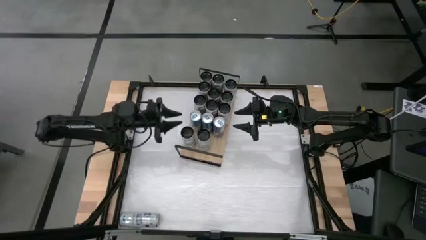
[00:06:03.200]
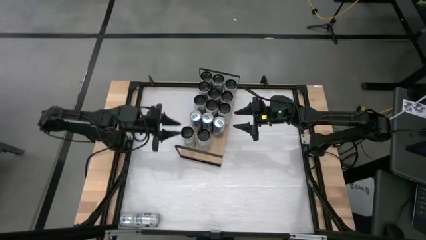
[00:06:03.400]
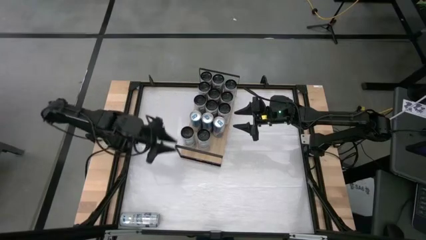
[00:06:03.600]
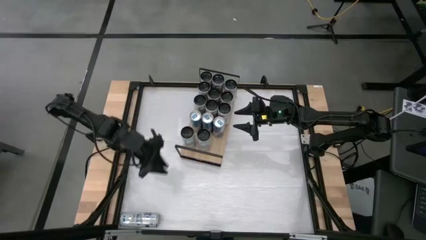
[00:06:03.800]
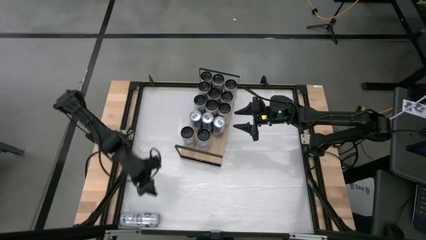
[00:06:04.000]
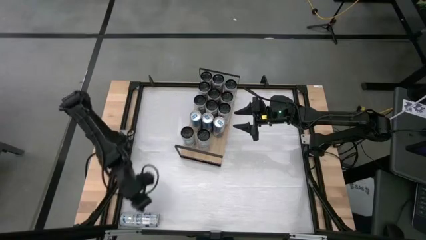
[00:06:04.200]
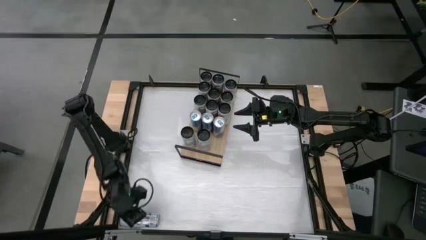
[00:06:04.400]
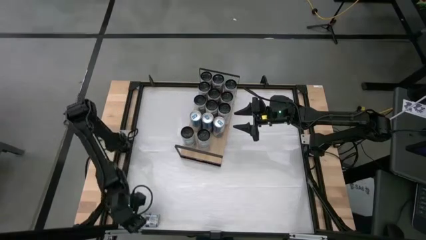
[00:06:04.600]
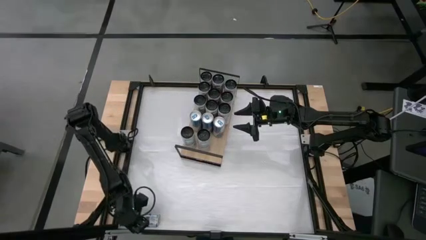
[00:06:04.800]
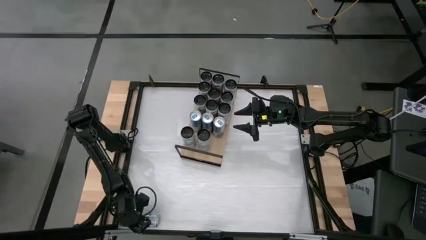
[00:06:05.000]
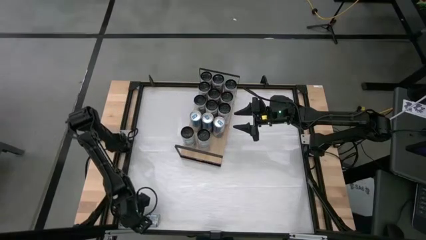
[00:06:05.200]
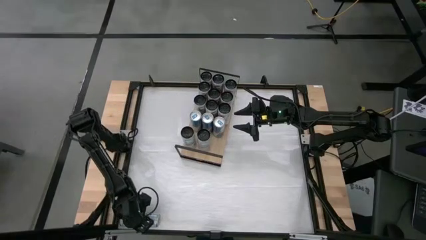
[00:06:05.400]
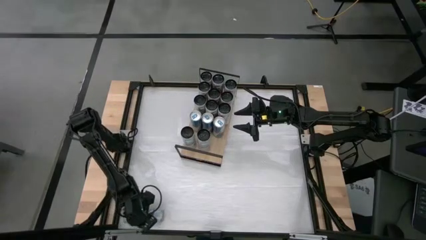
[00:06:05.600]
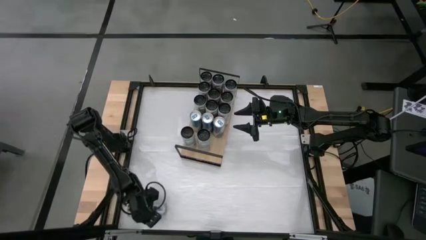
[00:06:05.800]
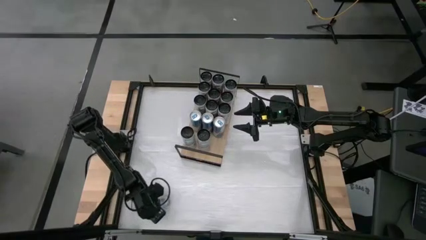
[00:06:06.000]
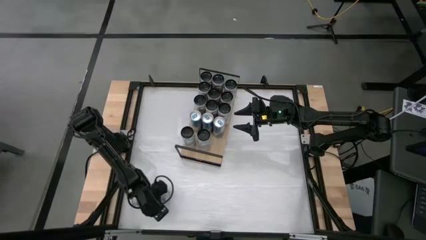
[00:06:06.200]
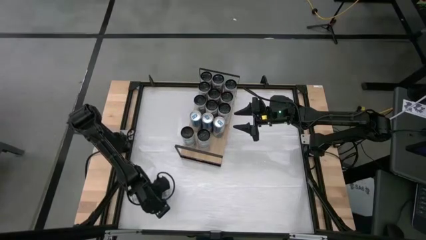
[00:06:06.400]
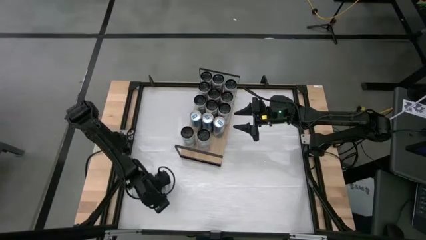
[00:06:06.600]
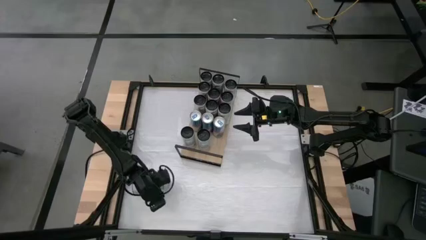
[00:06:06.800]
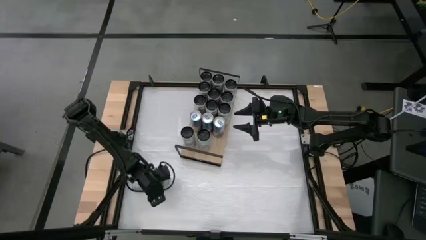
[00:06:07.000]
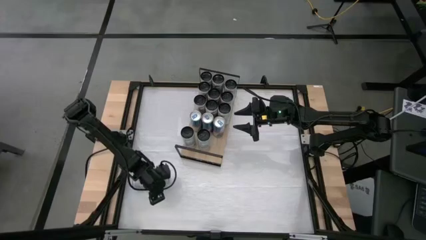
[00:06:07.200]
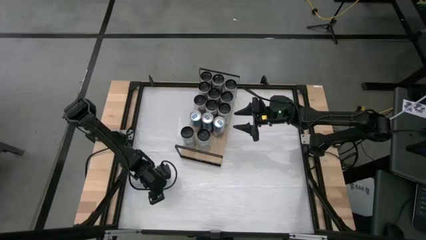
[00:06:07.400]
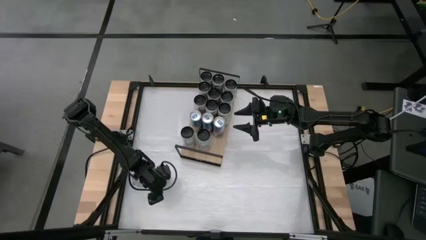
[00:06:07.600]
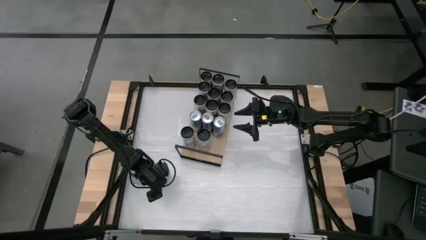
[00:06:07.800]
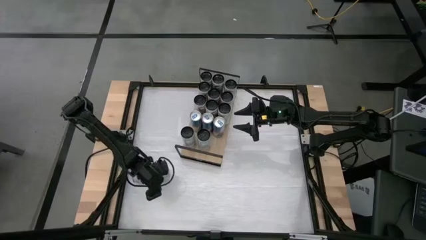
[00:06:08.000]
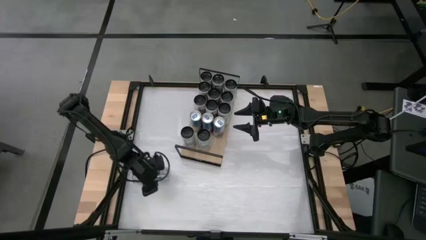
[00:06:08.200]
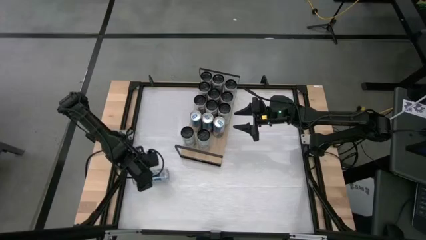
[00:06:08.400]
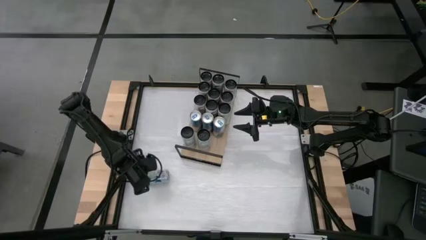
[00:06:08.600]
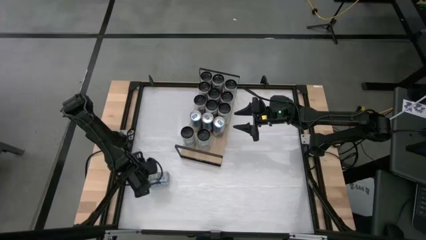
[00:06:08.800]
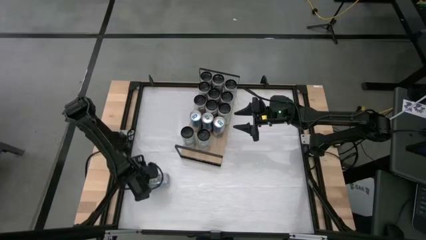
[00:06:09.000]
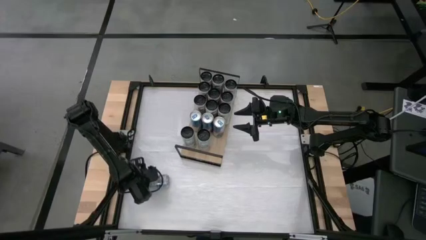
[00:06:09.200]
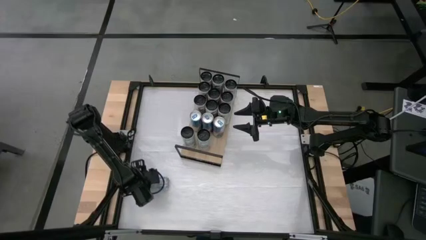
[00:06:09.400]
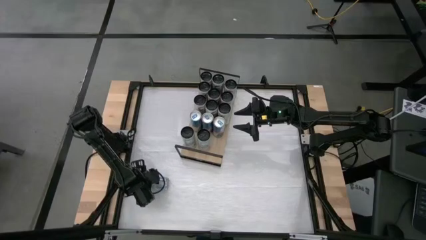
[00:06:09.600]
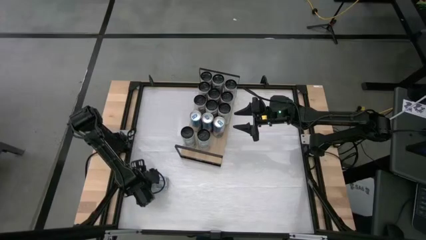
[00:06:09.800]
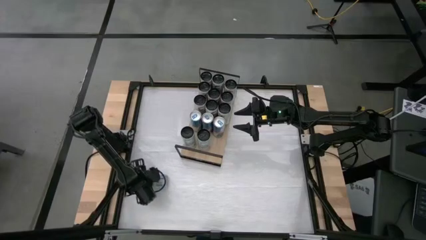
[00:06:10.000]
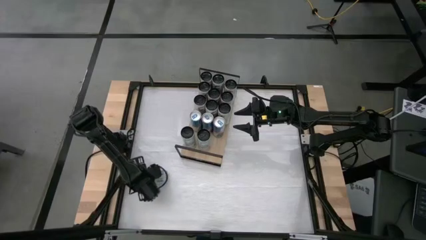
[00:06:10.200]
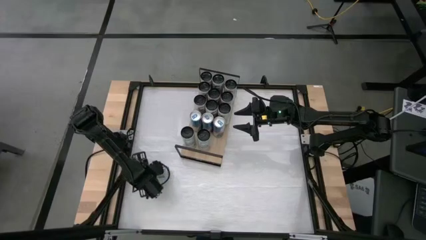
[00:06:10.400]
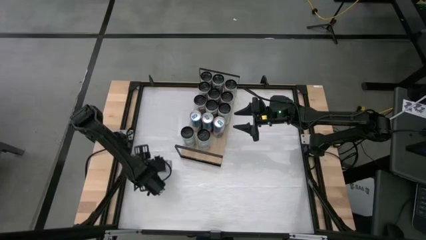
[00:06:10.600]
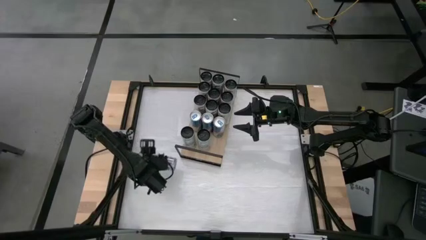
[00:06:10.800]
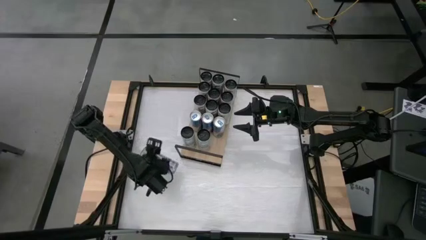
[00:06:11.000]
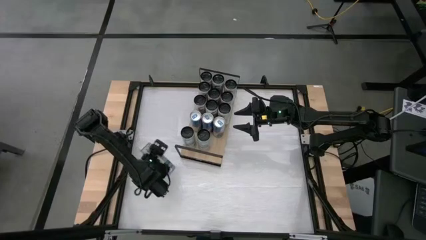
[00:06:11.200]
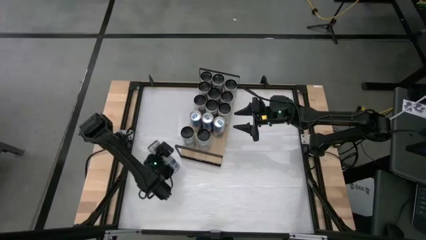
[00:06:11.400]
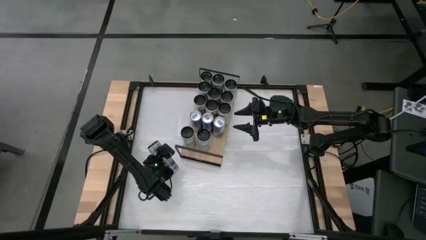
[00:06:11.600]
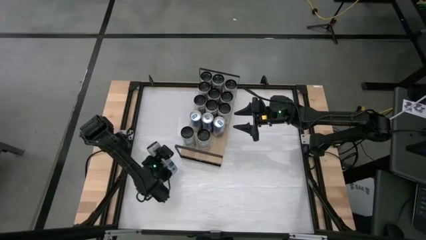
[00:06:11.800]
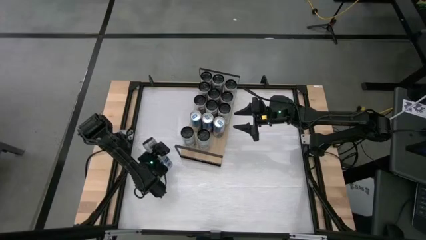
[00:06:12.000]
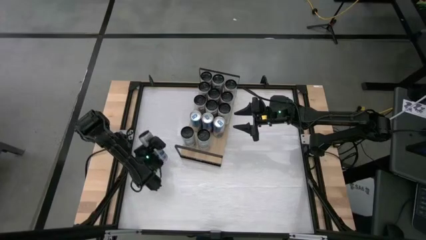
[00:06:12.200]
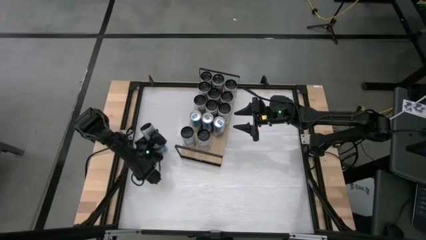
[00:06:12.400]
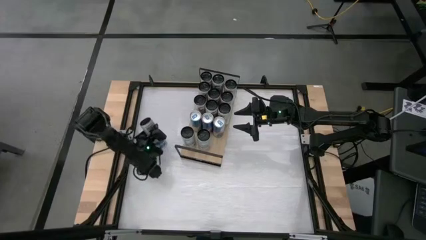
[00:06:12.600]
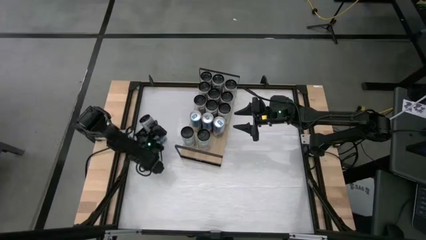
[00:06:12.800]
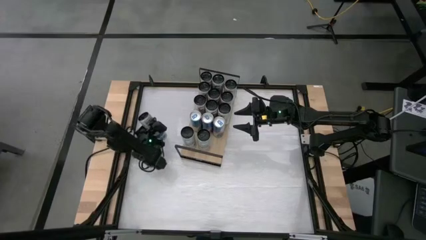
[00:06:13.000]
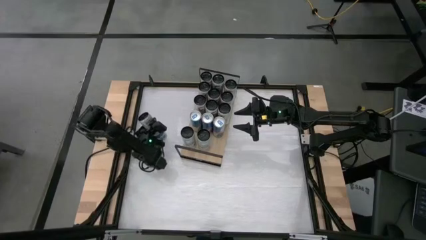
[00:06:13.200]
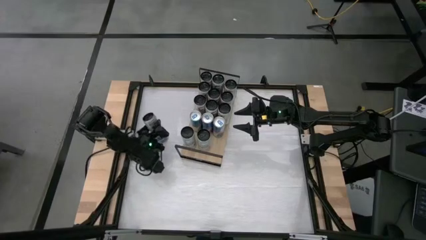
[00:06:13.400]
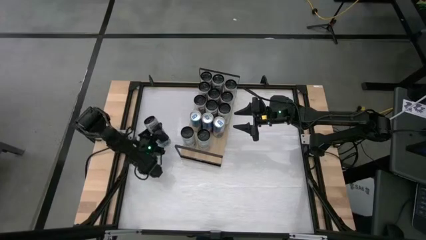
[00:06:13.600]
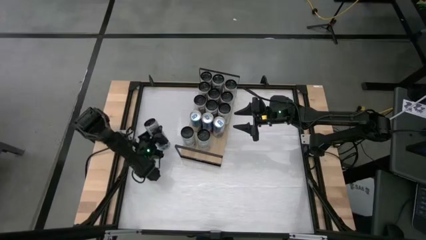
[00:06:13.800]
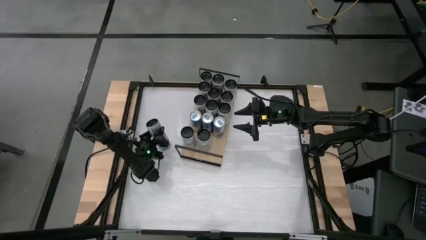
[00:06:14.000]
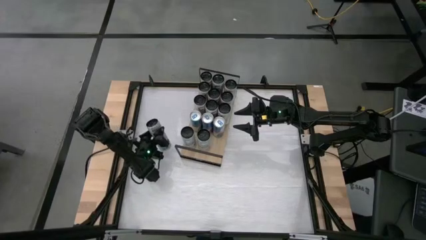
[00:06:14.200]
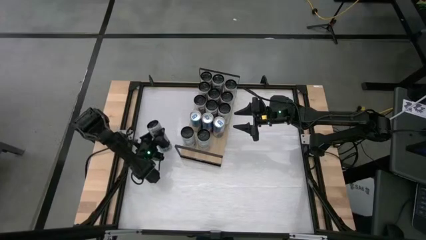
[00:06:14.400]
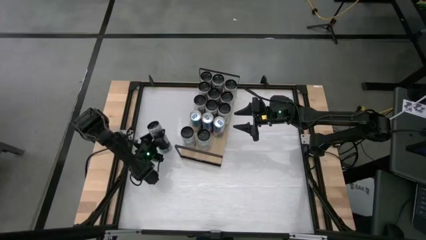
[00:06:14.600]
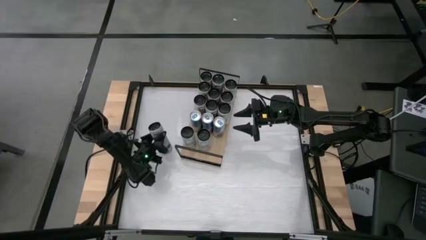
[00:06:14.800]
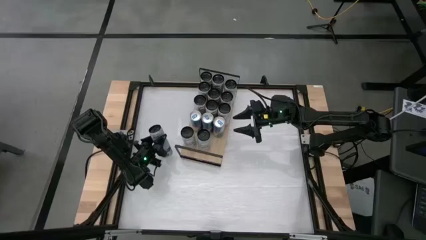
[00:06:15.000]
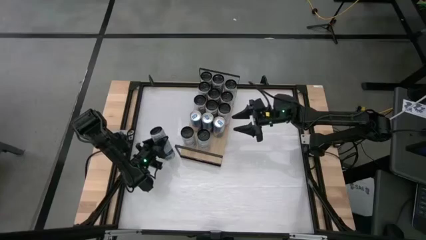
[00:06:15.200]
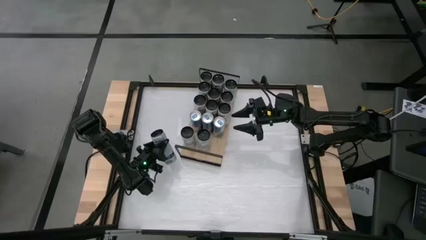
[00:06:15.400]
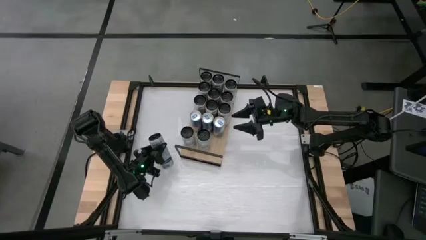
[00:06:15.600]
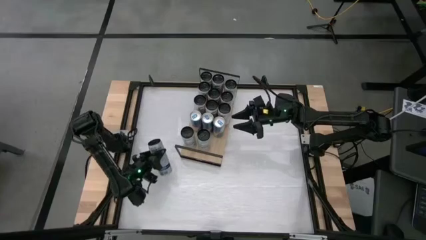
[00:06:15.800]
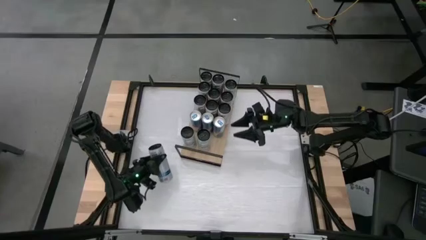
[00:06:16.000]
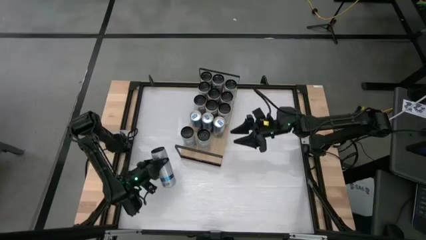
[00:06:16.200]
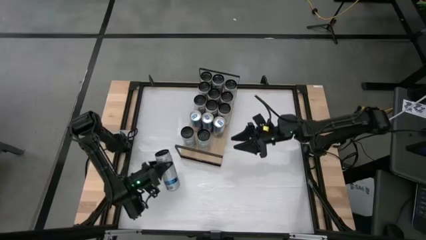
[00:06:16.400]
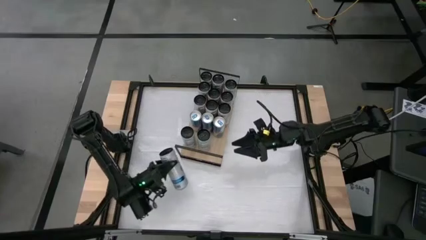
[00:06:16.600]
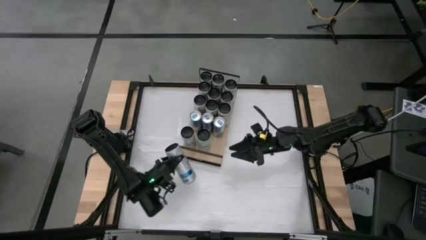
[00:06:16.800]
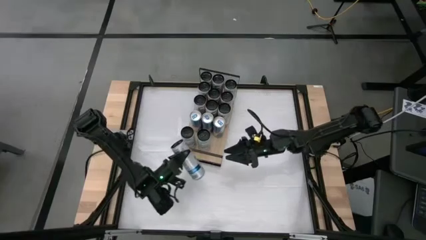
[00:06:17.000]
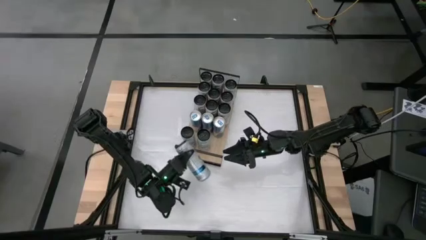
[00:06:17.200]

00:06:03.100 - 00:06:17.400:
Task: Place canned beverage on shelf
Move the blue soda can to the top right of the table

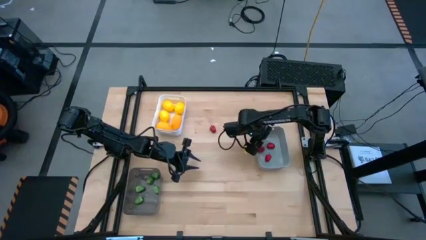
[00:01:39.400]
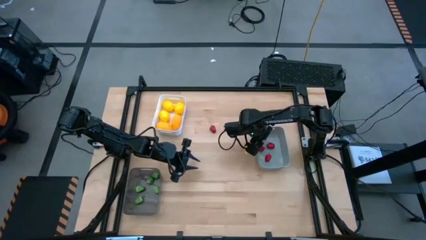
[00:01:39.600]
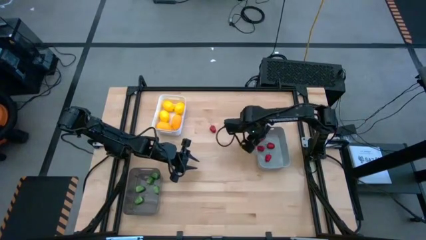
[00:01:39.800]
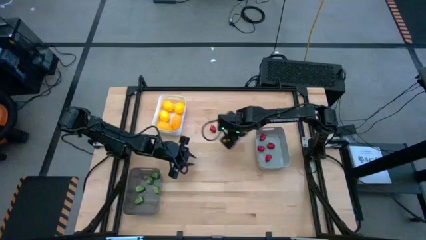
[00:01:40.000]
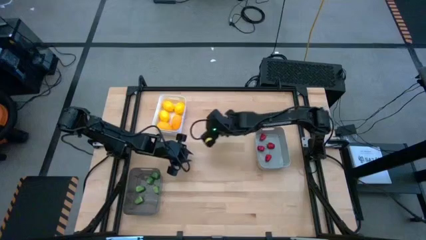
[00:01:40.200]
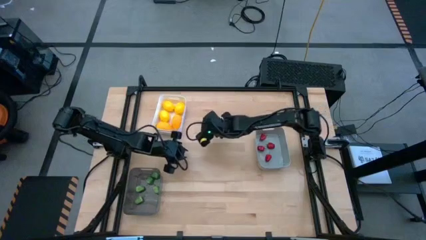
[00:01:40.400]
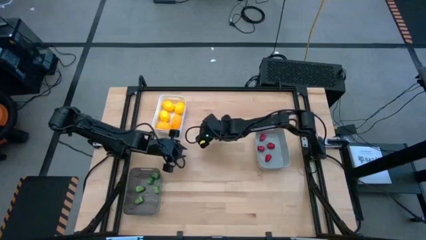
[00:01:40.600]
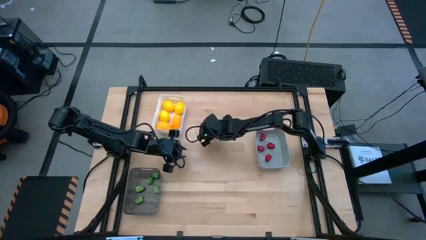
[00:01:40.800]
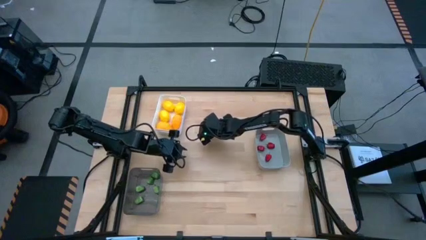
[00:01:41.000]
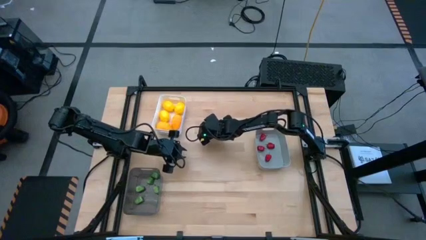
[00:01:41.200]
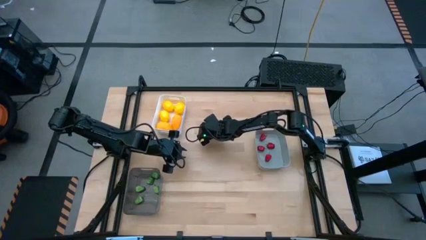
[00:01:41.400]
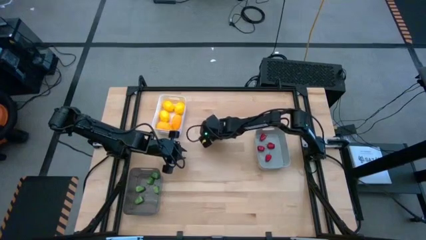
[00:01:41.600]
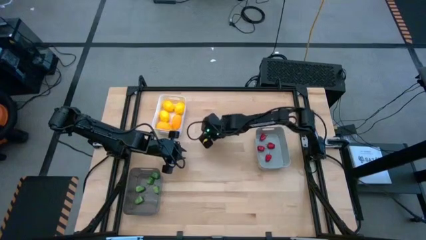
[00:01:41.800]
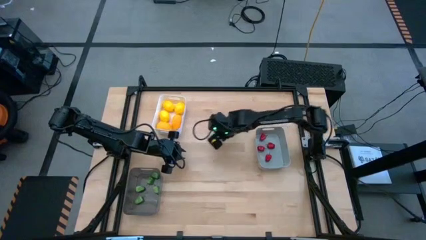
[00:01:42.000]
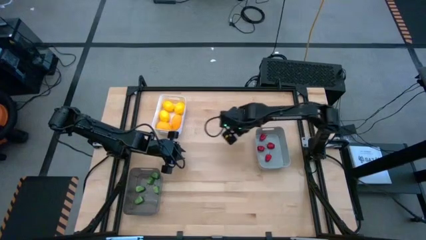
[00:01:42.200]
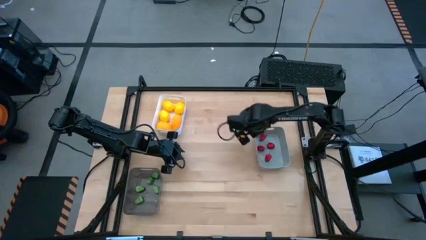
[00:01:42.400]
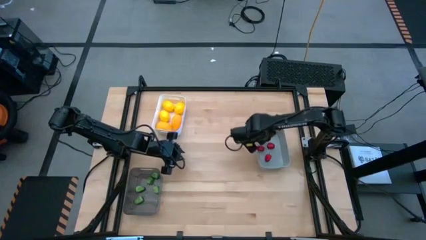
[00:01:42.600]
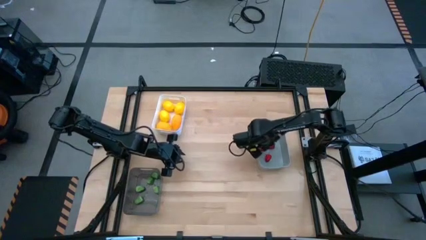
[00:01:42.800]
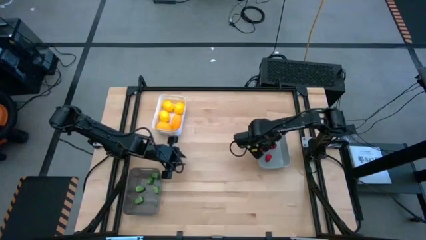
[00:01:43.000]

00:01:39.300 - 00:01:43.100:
Task: Sort produce into baskets
Put the red chili pepper into the gray bin
